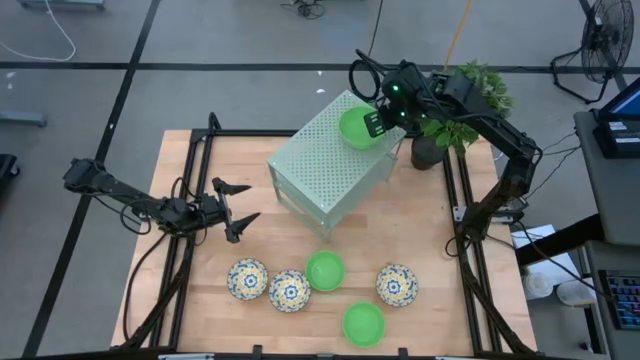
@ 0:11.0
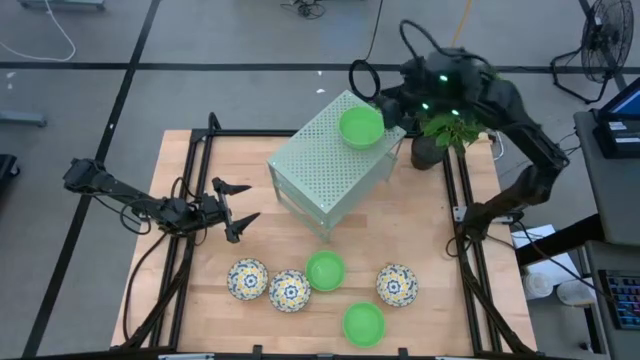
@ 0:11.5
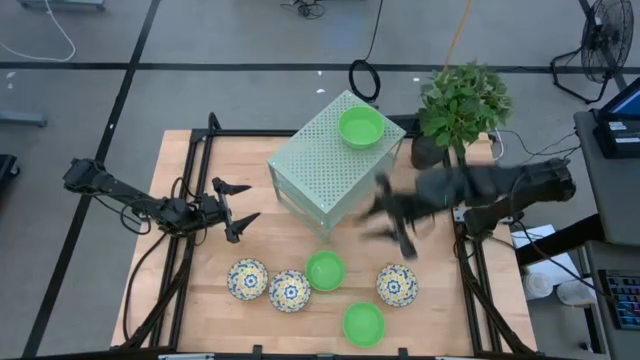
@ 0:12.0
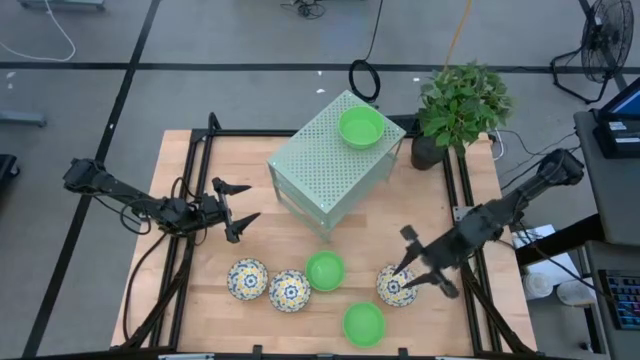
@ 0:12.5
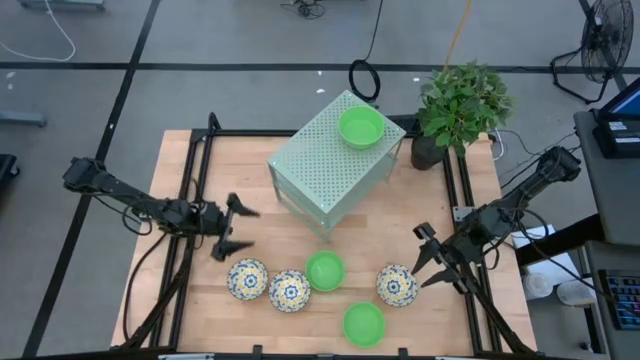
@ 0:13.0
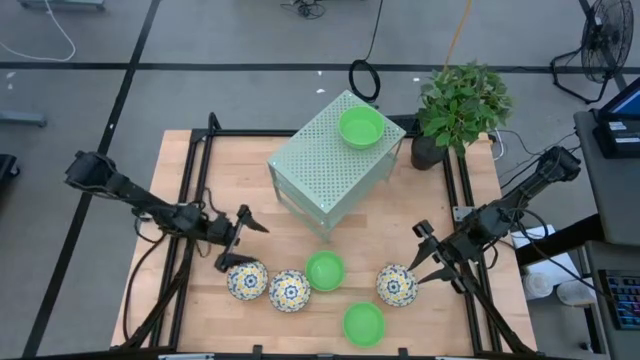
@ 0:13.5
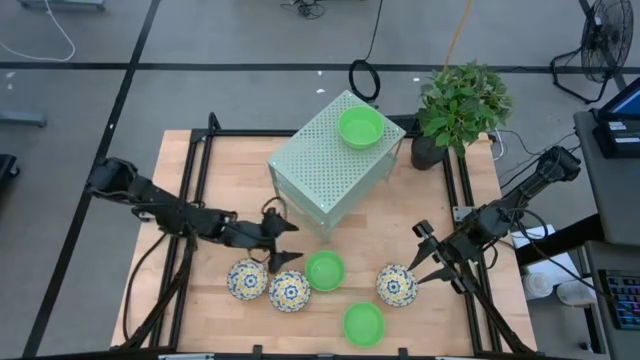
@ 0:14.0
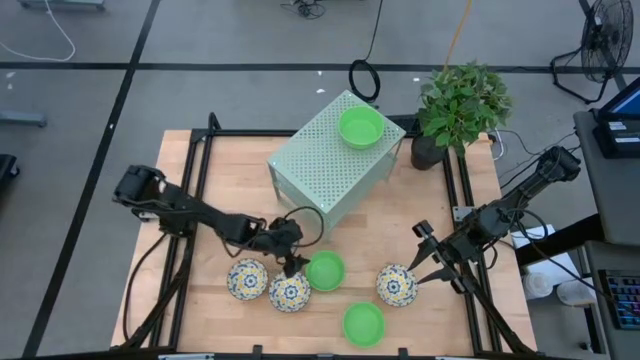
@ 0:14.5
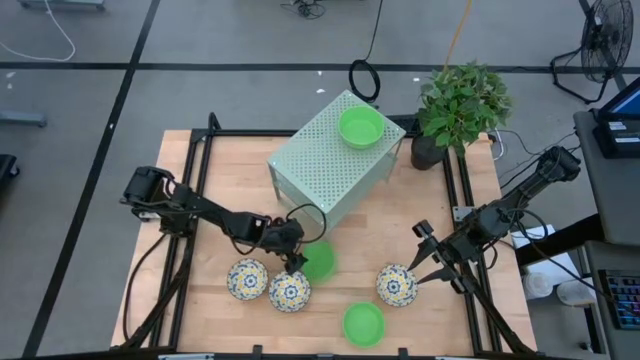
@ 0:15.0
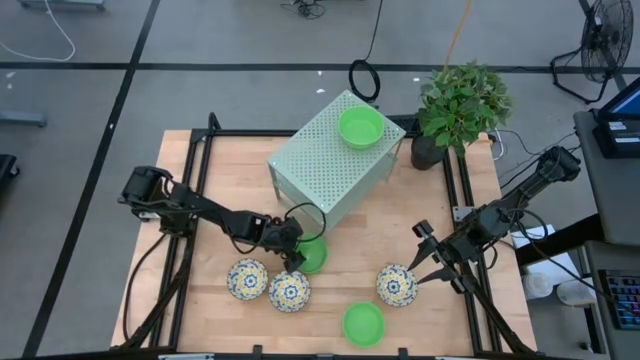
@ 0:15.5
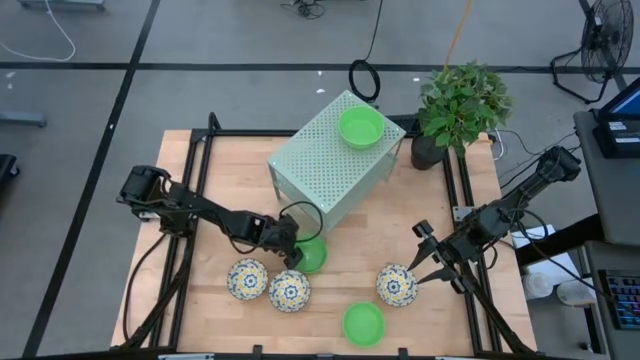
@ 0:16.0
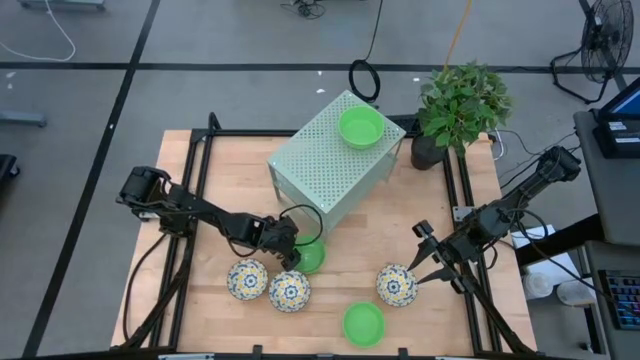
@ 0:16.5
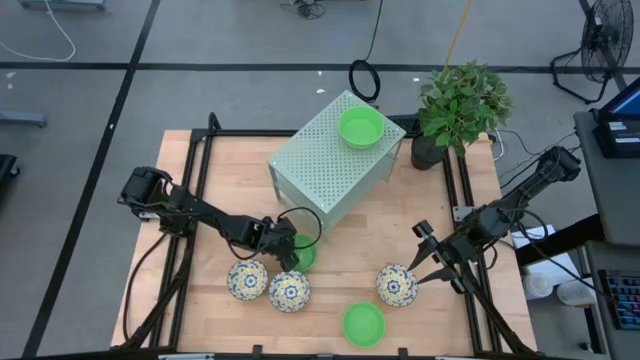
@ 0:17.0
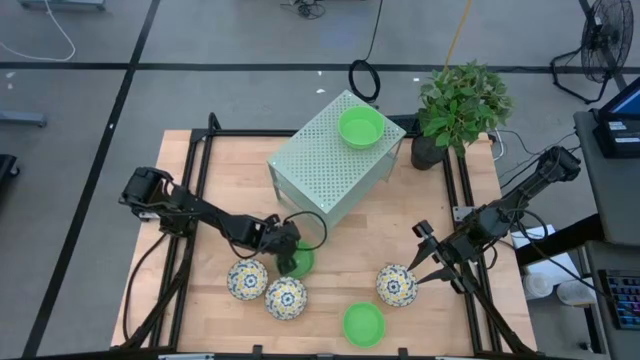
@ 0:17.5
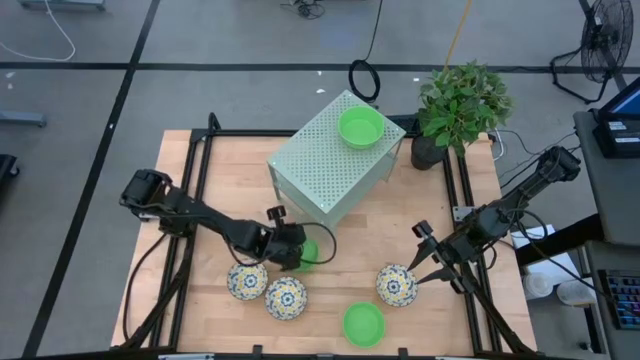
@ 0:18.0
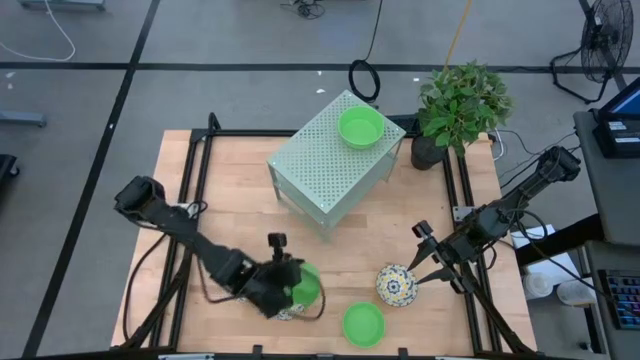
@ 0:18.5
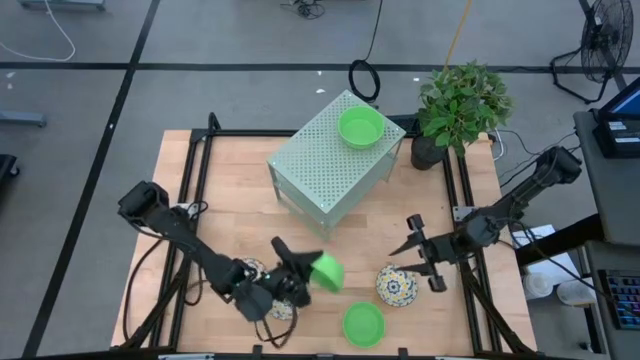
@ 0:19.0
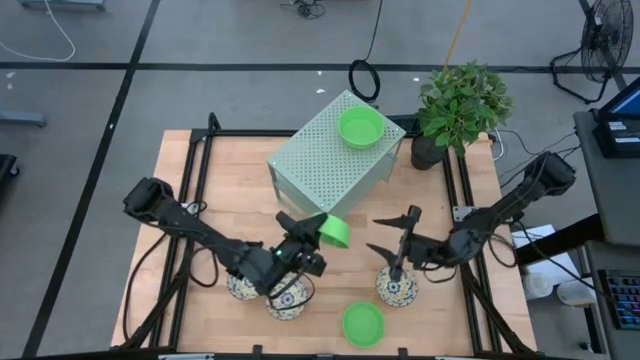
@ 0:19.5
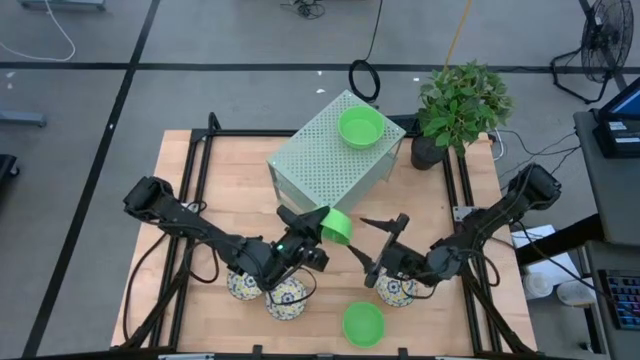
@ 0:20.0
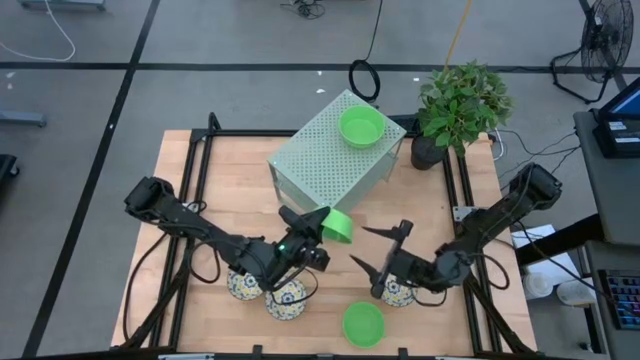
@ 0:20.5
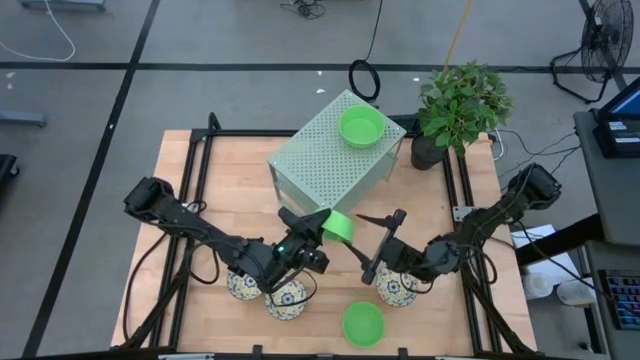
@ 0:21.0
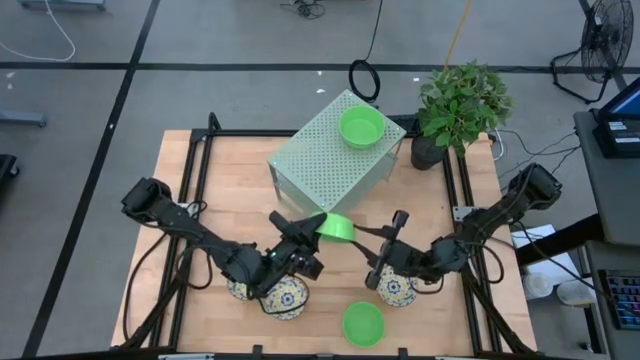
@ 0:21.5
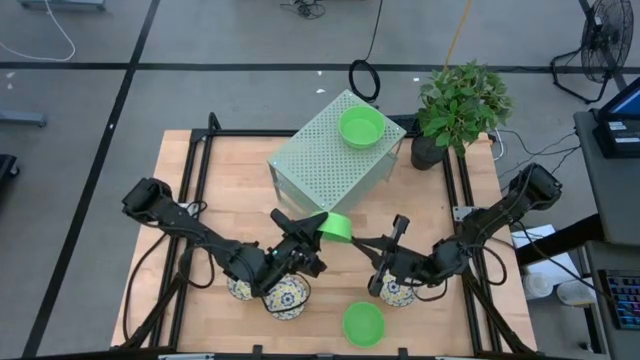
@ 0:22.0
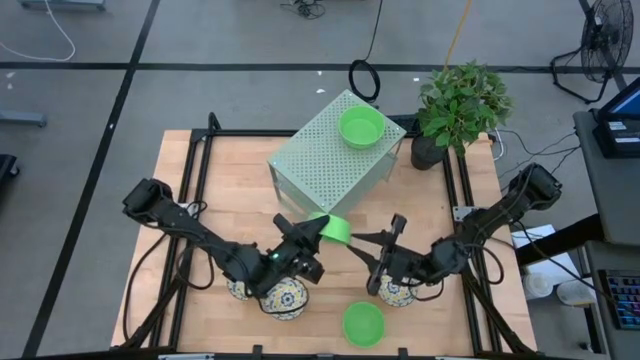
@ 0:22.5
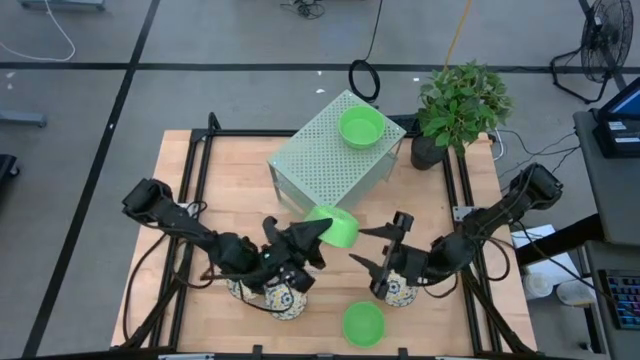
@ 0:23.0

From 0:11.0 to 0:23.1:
Task: Pick & Place Mini bowls
Stack the top green bowl on the green bowl on the shelf

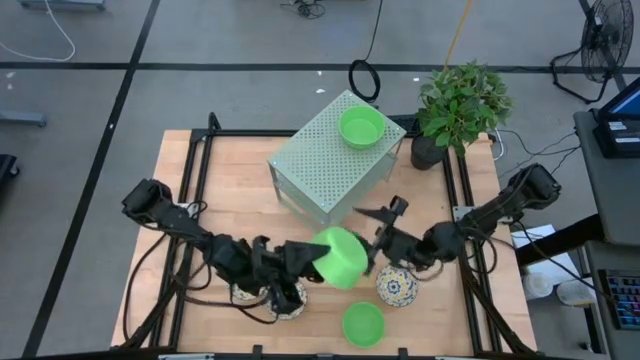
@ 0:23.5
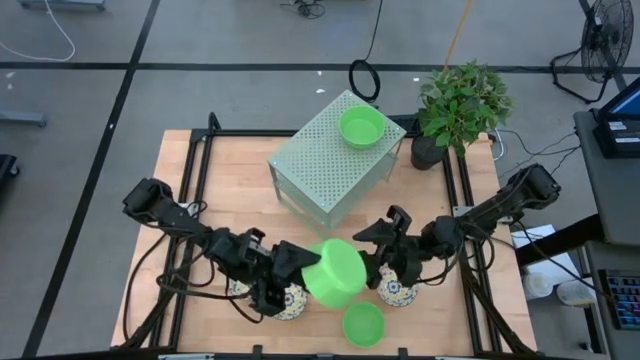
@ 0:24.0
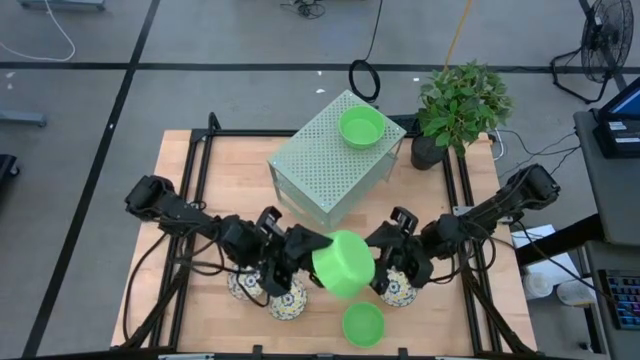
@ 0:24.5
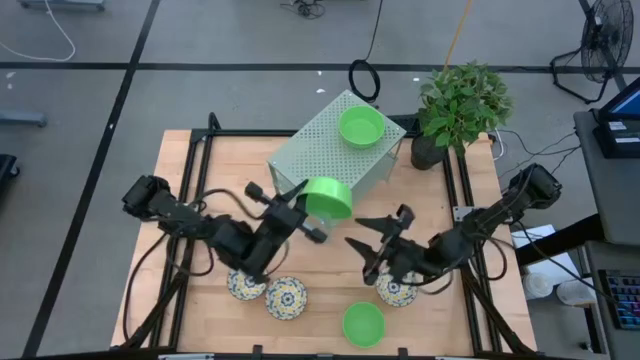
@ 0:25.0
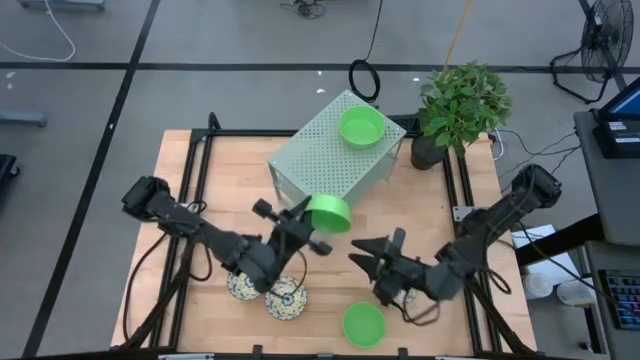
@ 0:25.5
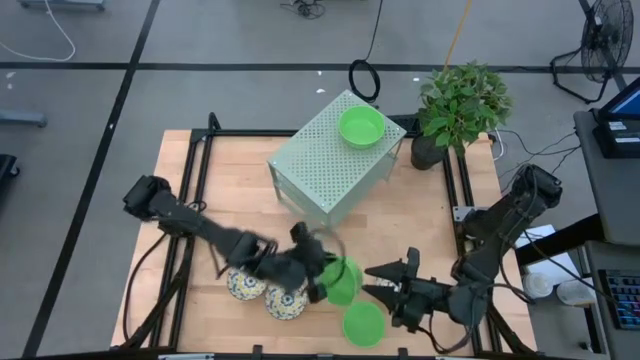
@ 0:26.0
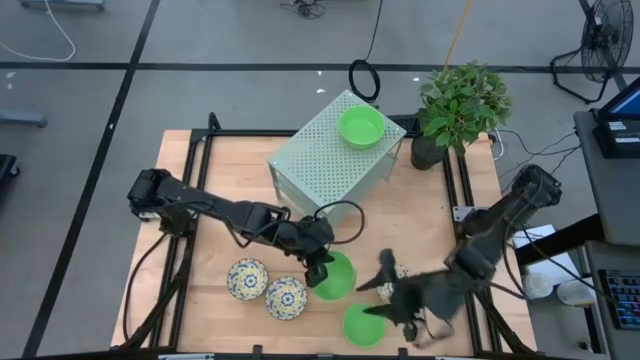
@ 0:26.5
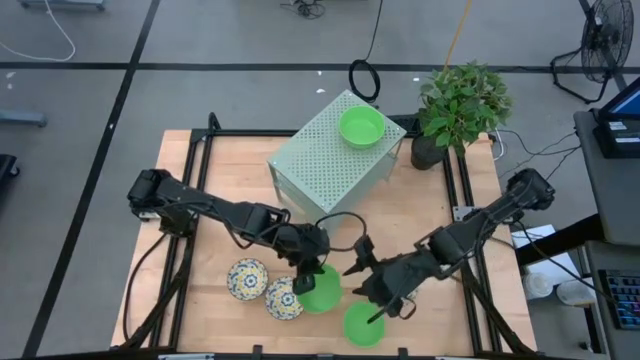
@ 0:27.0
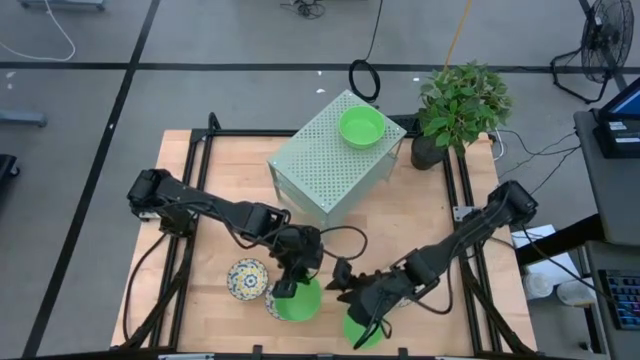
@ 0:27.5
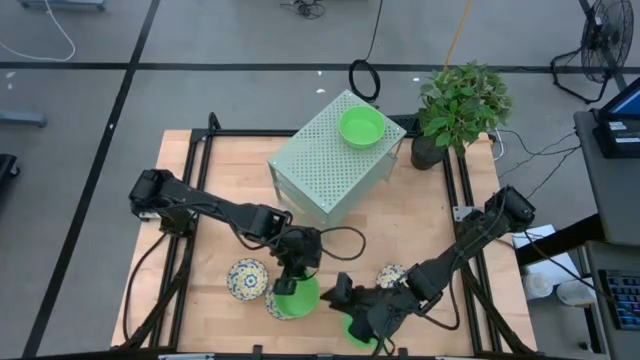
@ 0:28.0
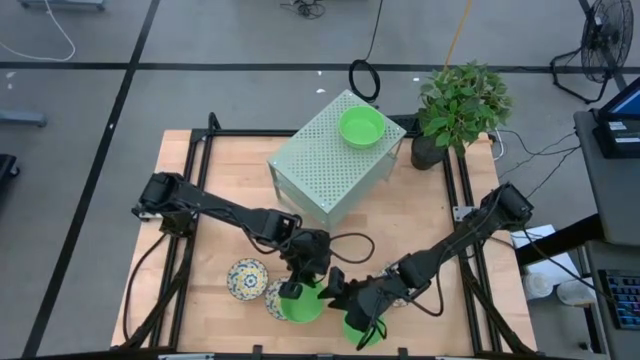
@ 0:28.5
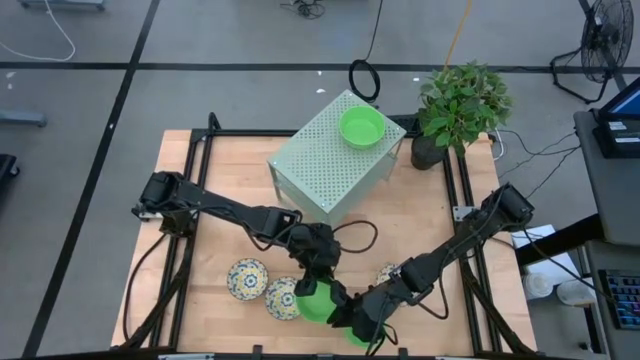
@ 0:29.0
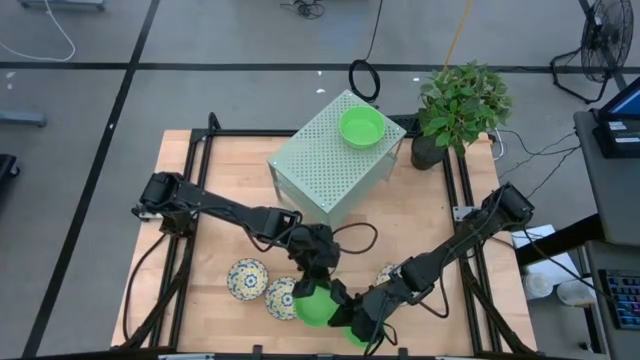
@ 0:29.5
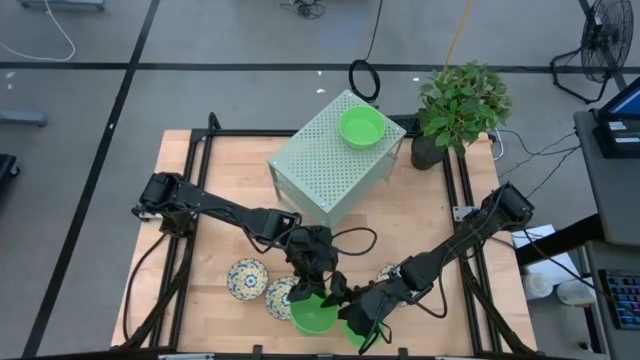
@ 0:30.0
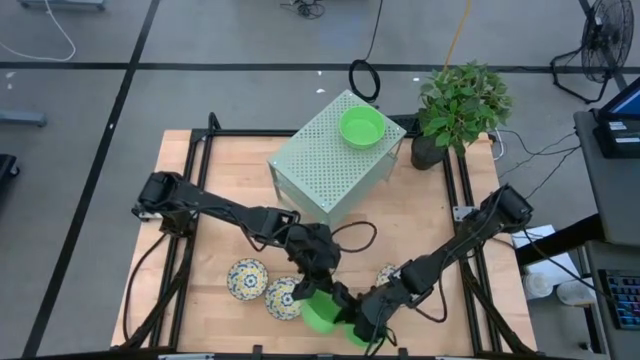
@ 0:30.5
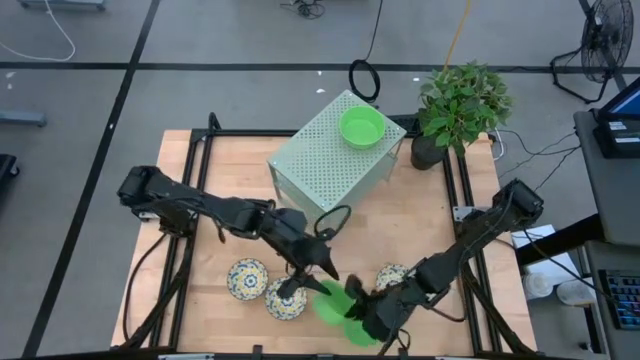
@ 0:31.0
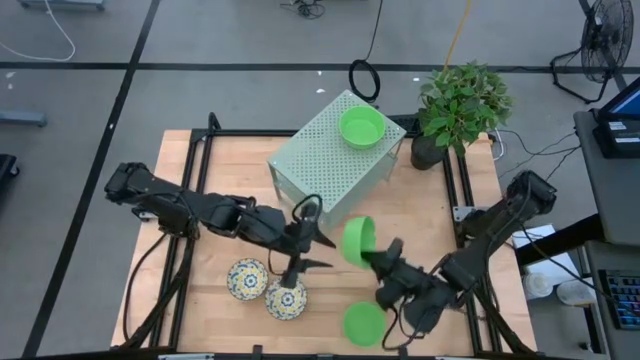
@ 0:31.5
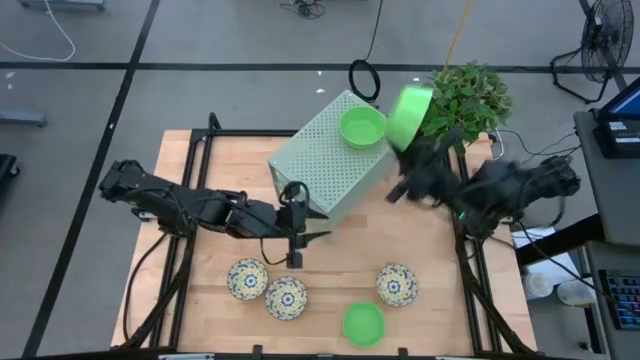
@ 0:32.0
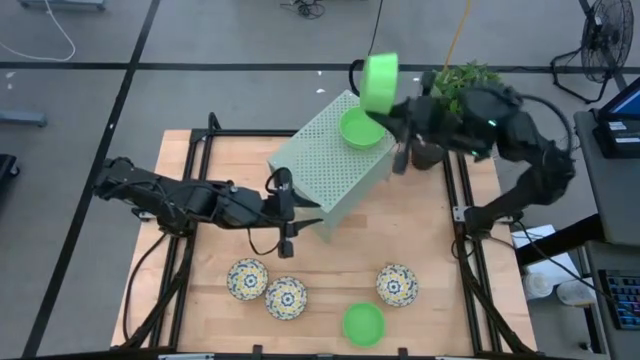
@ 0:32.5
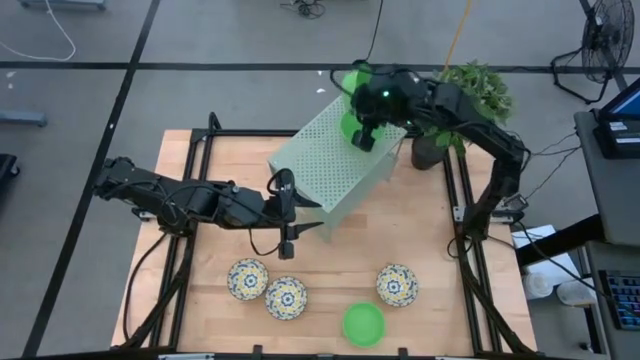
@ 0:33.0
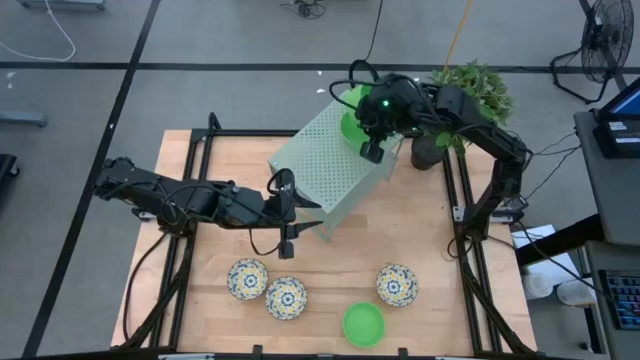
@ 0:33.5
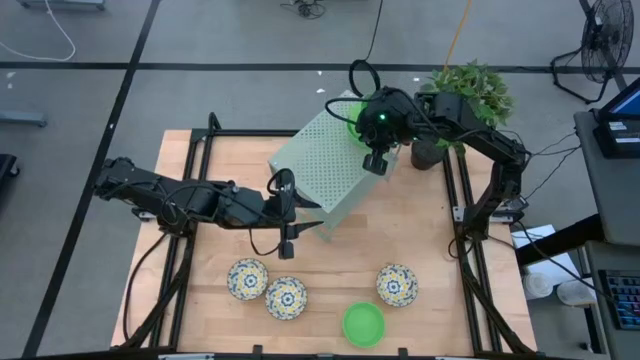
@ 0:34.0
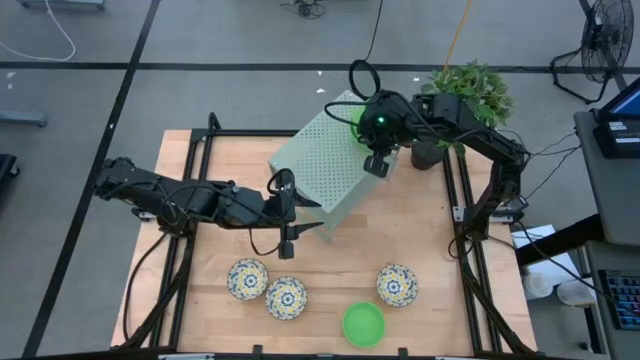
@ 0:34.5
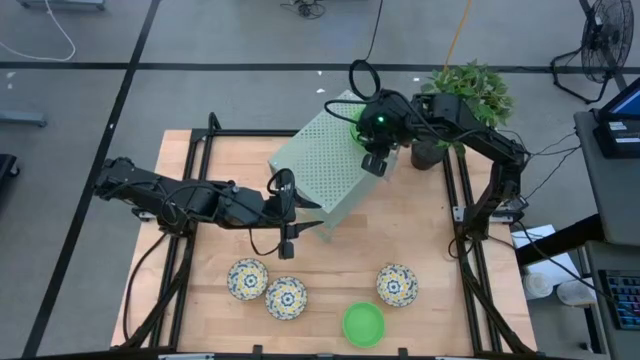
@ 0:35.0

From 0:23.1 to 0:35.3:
Stack the top green bowl on the green bowl on the shelf
